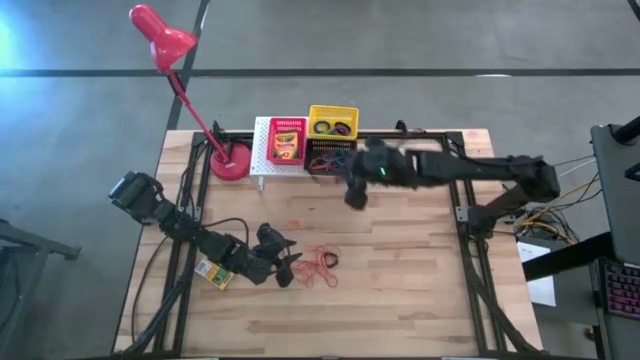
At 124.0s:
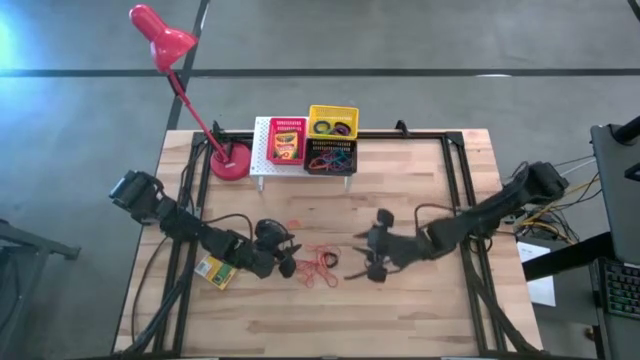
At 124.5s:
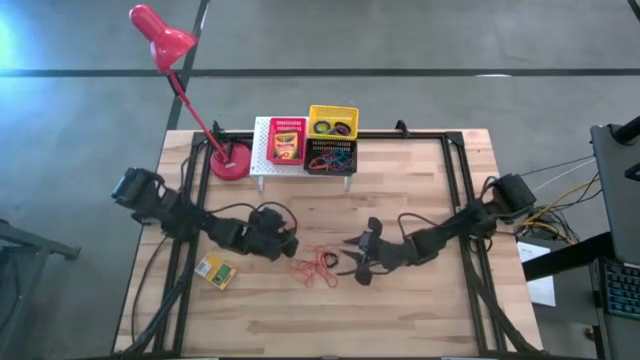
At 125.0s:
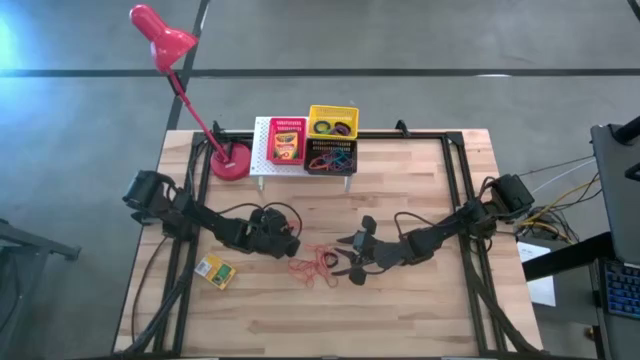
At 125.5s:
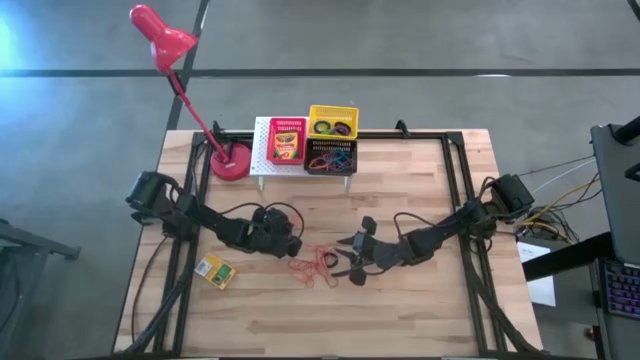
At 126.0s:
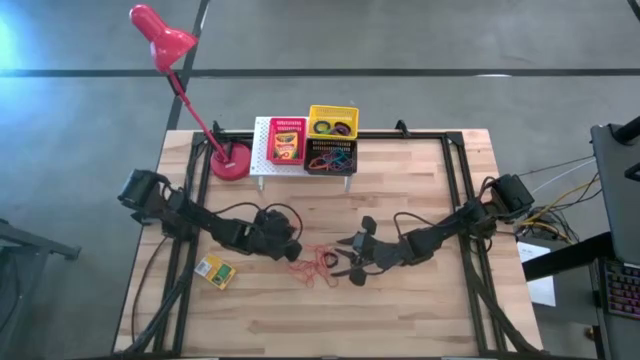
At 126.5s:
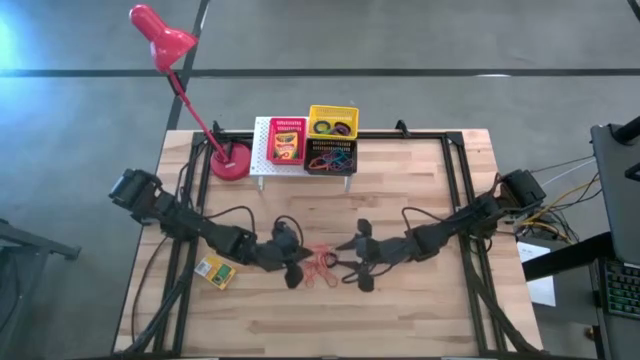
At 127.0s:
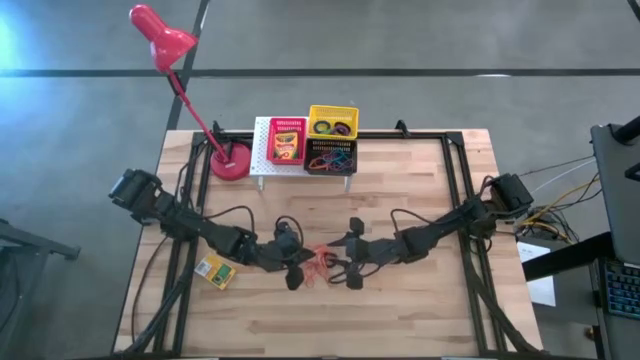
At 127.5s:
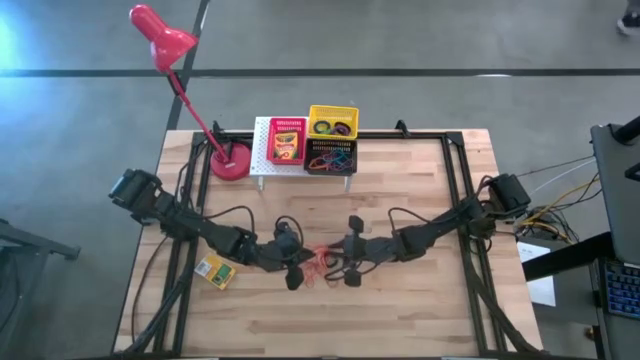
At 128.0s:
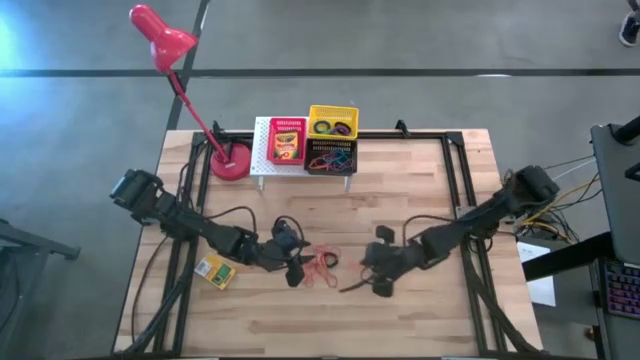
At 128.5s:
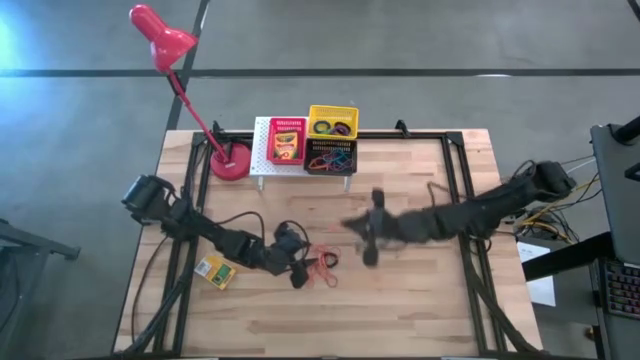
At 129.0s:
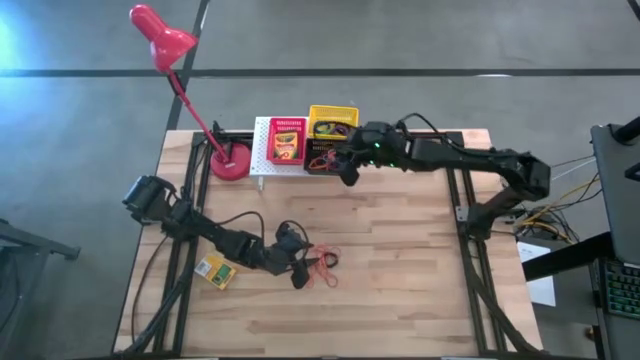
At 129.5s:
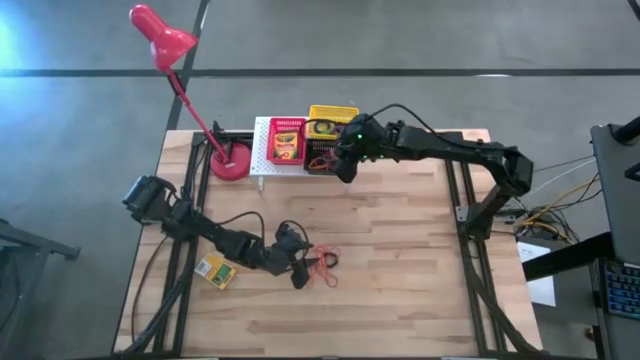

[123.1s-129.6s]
Task: Pick & Place Office Desk Supplies
Put the orange rubber band into the black bin on the shelf

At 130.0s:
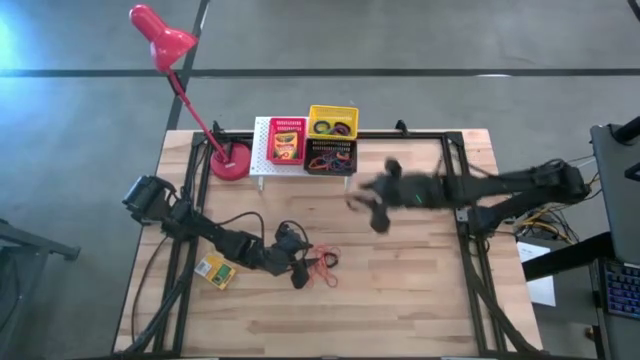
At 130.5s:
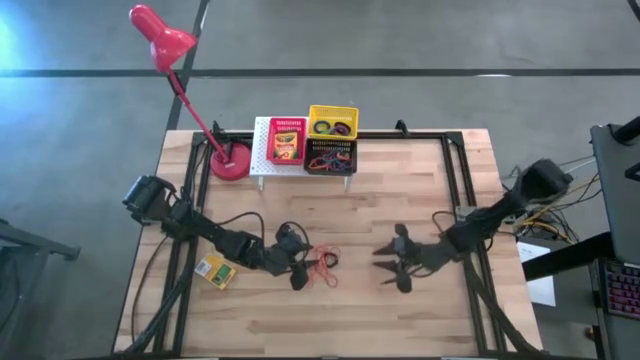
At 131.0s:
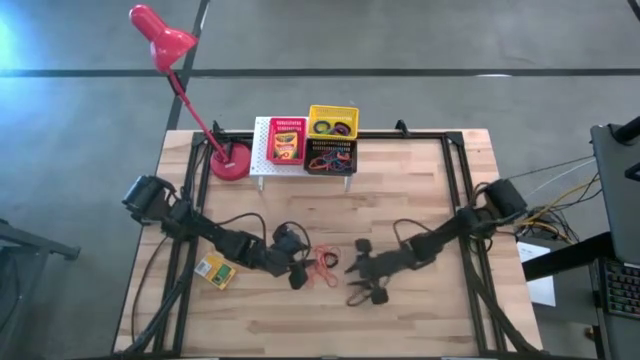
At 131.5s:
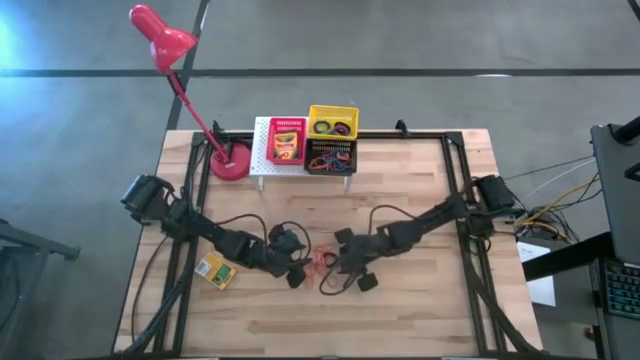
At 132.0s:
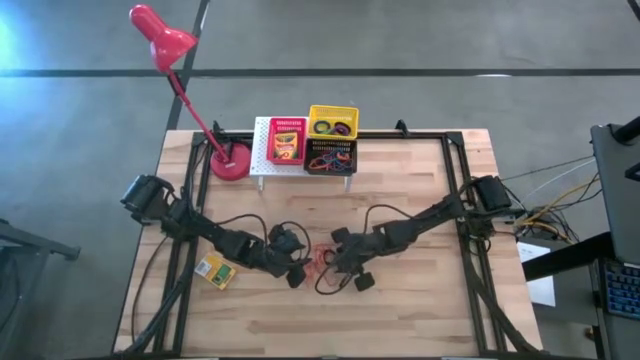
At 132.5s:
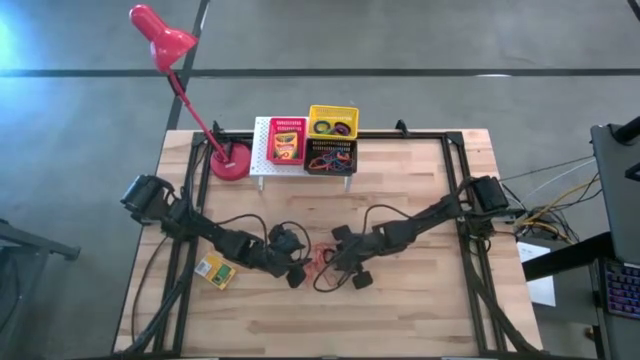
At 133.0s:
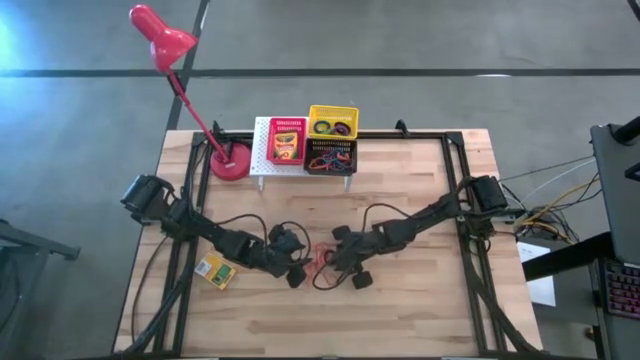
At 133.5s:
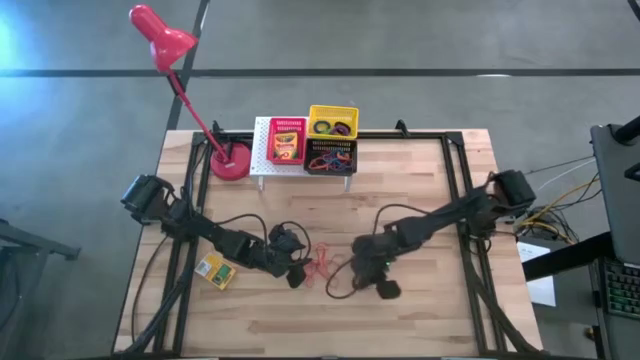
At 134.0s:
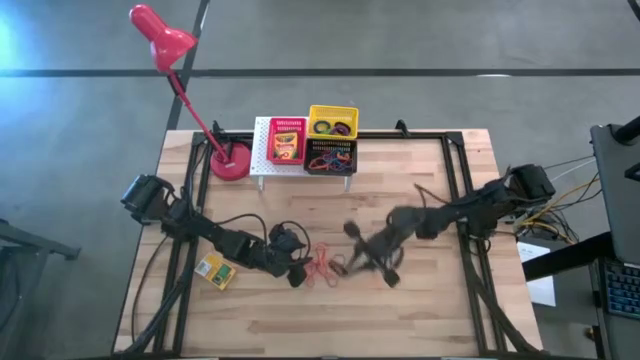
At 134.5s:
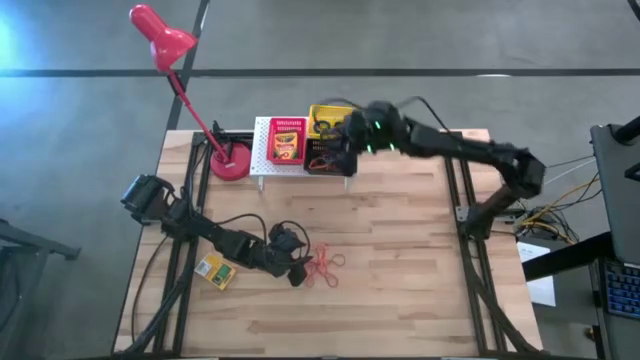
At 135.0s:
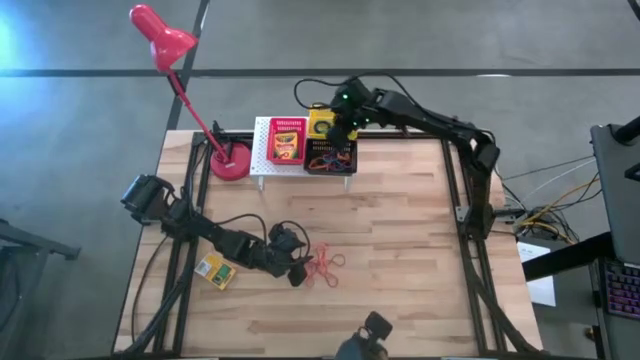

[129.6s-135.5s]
Put the black spring keychain into the yellow bin on the shelf

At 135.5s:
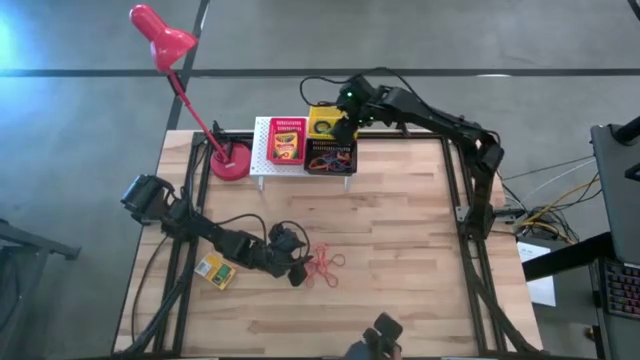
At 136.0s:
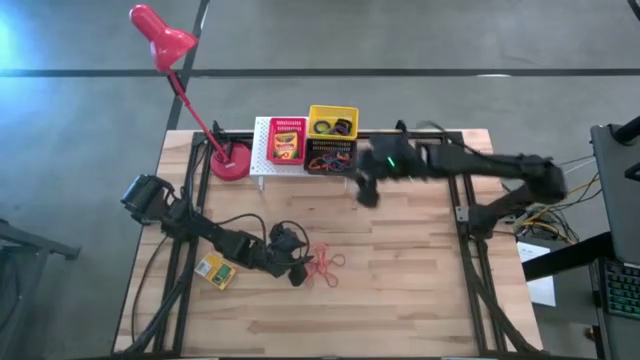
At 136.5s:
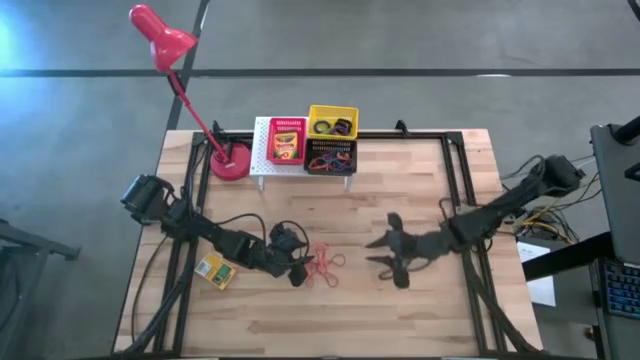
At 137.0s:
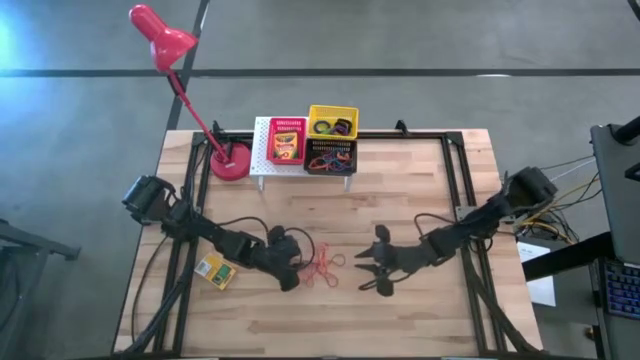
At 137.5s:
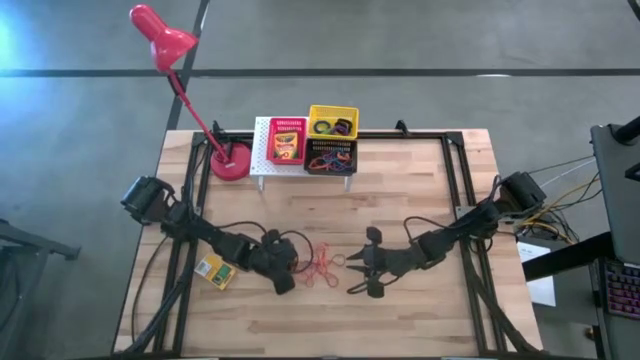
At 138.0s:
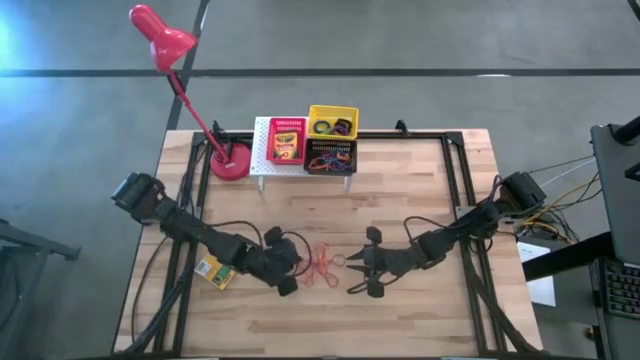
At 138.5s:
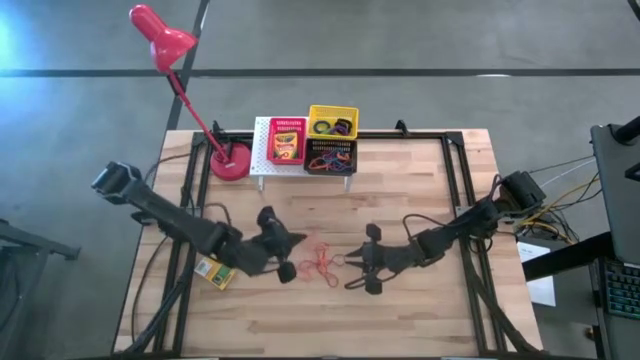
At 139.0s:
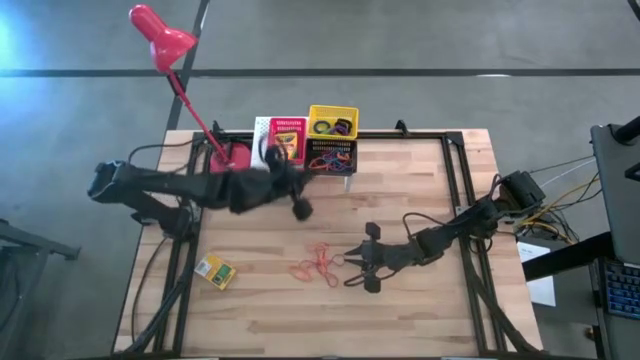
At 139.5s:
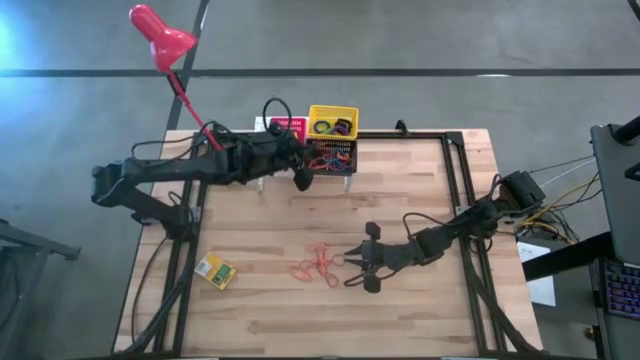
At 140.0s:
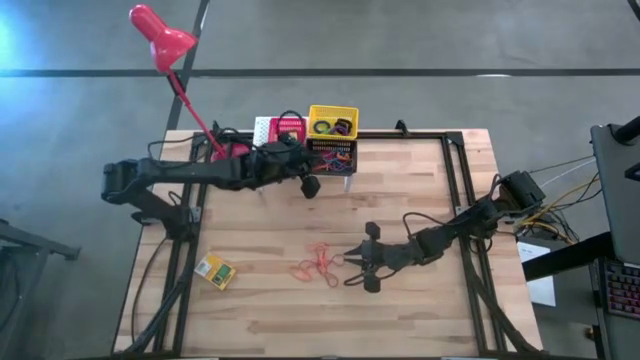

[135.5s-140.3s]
Put the red rubber band into the black bin on the shelf

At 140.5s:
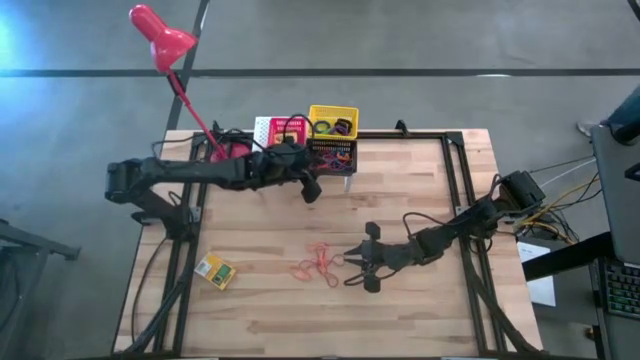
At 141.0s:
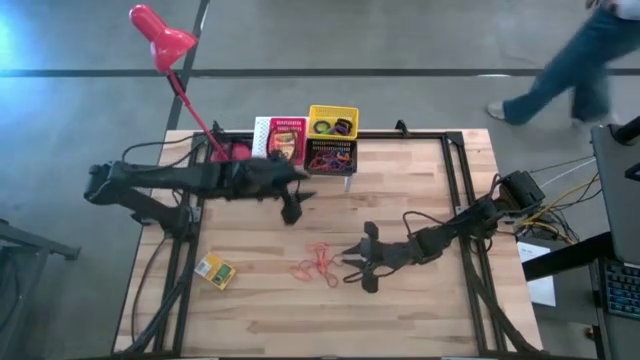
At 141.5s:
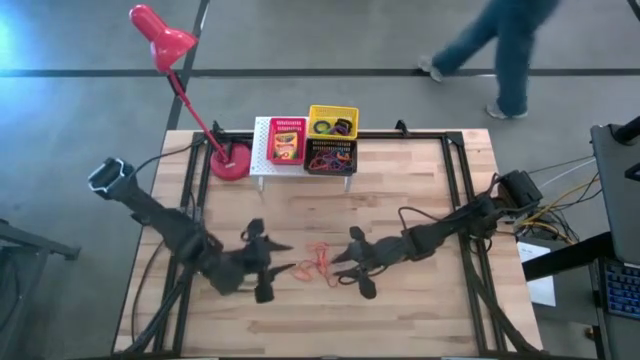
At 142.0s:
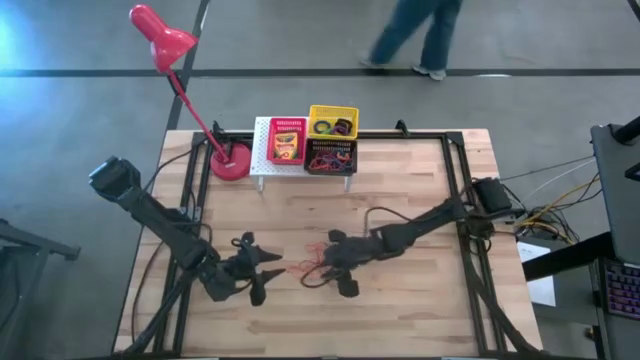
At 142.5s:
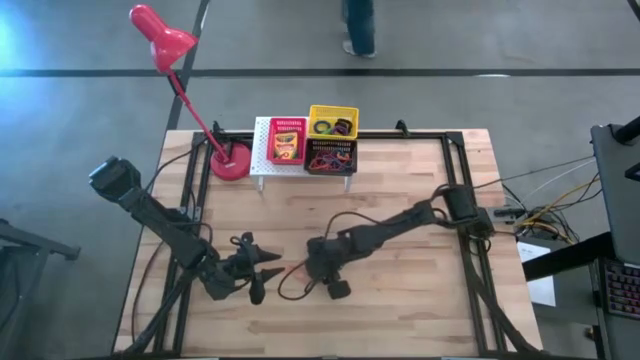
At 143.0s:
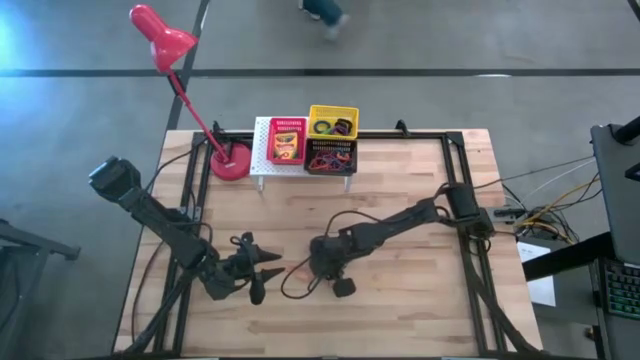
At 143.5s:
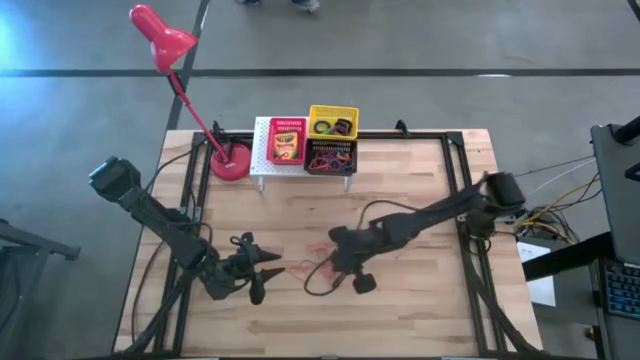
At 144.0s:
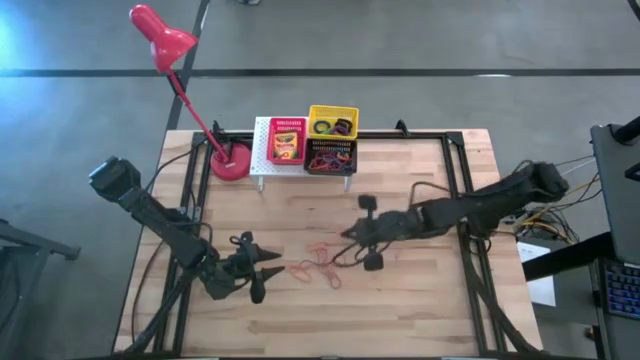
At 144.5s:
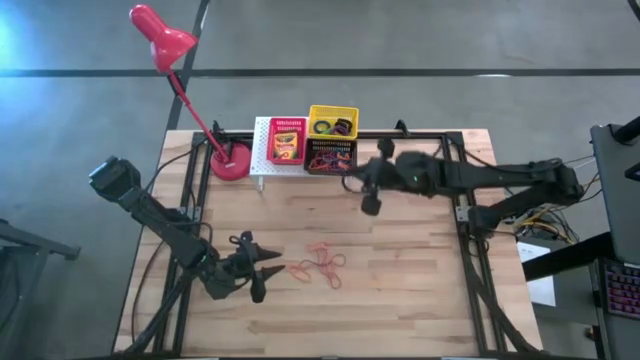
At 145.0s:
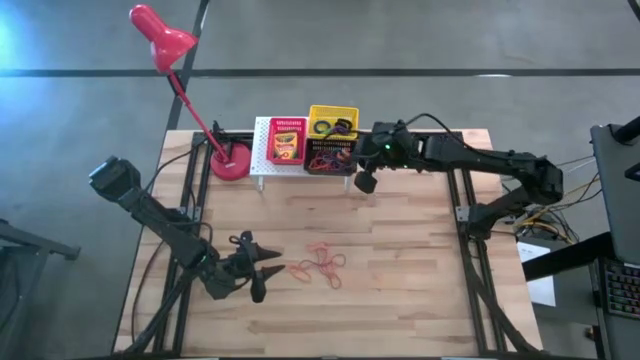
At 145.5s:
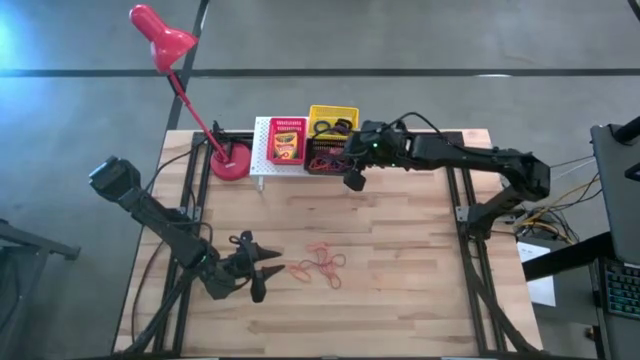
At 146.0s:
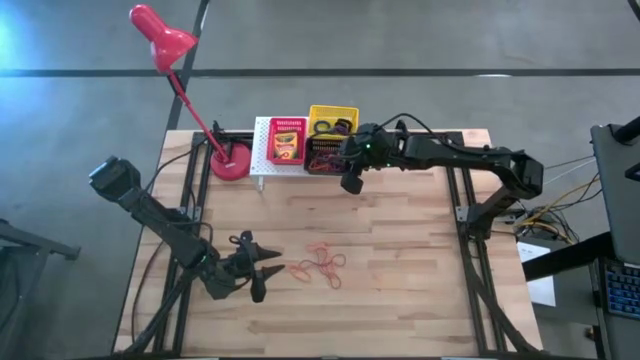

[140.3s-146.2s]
Put the orange rubber band into the black bin on the shelf
